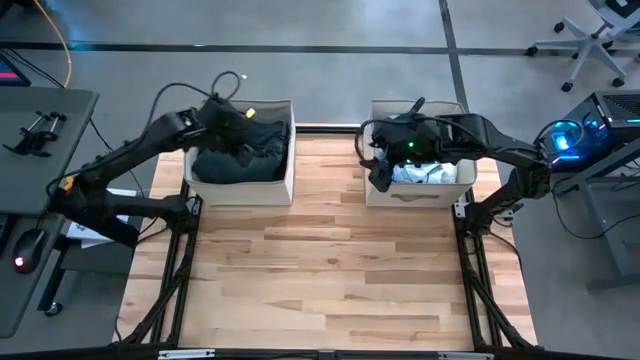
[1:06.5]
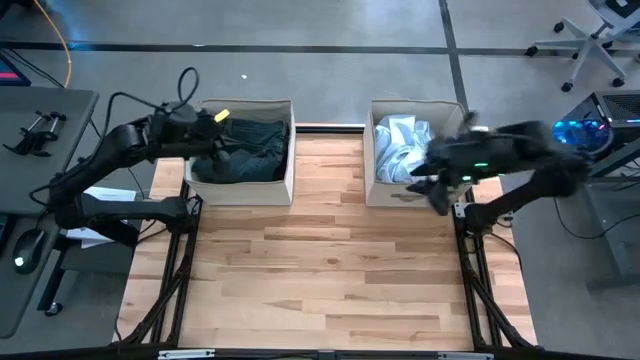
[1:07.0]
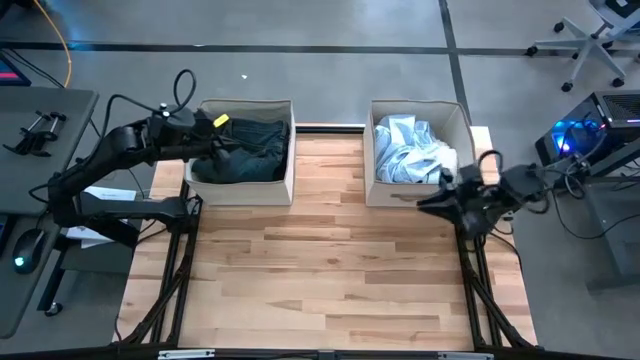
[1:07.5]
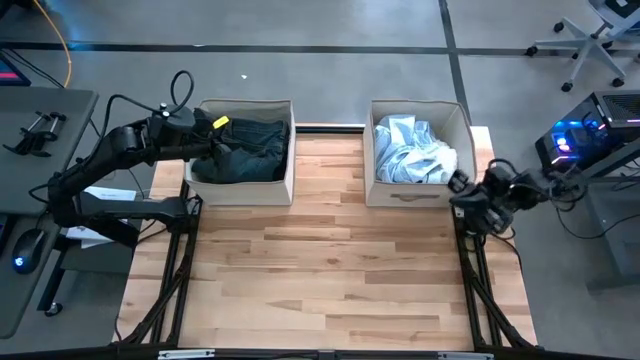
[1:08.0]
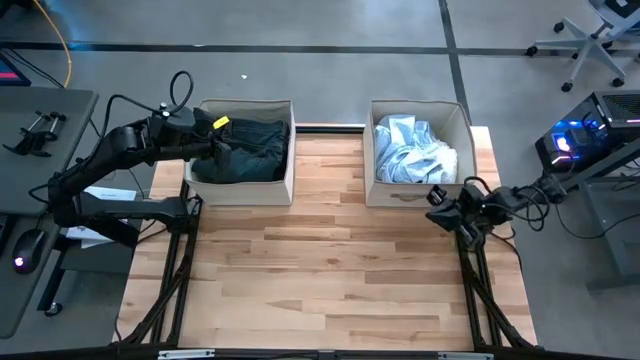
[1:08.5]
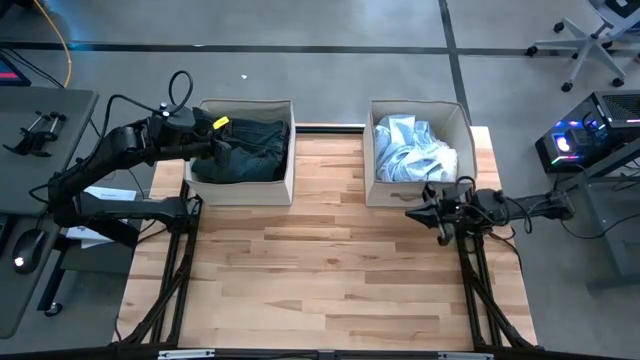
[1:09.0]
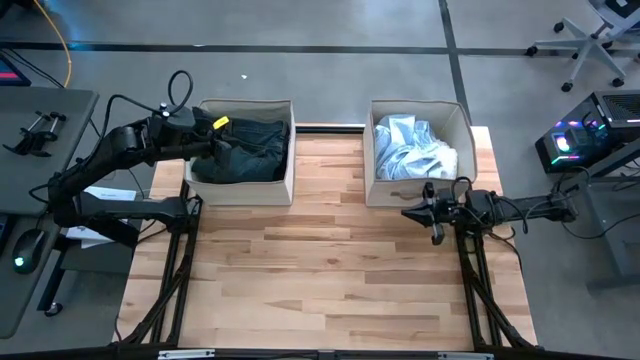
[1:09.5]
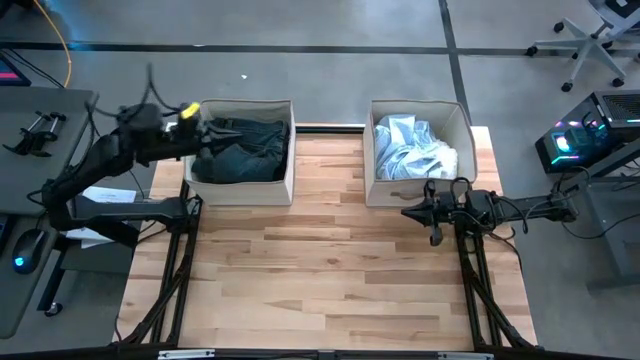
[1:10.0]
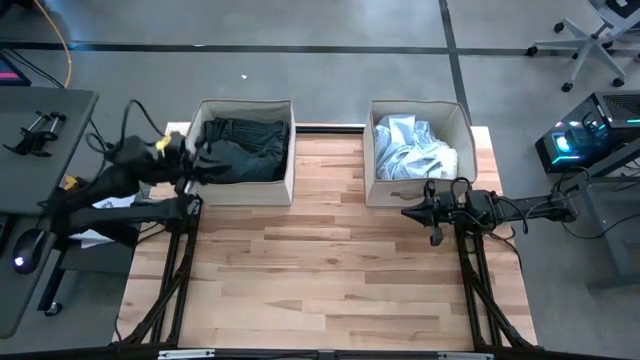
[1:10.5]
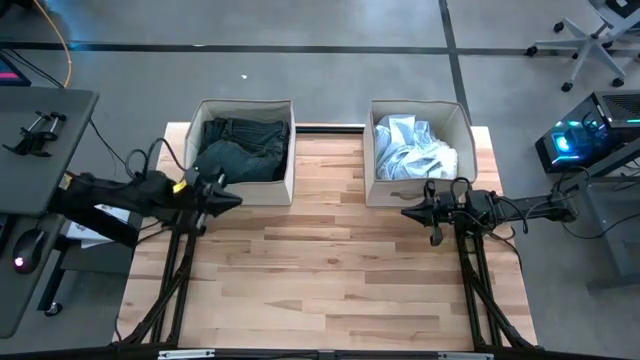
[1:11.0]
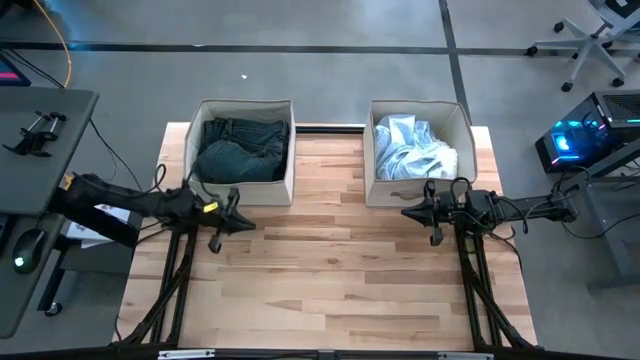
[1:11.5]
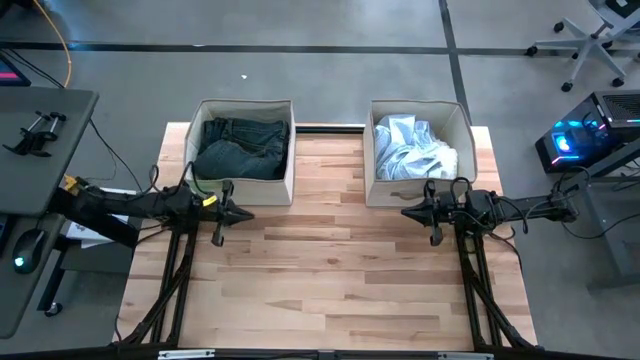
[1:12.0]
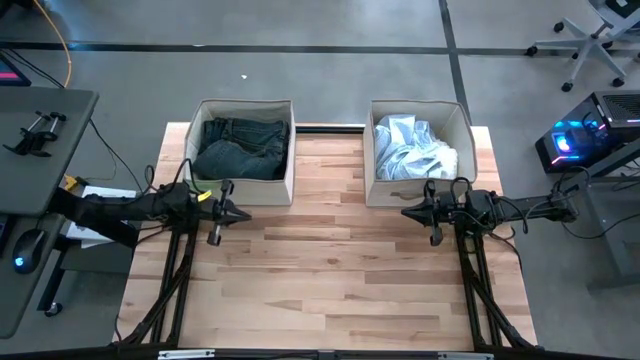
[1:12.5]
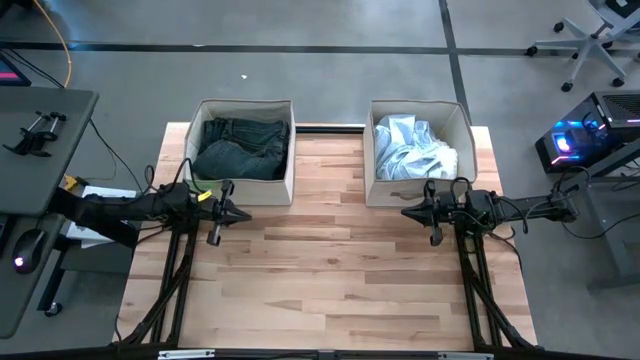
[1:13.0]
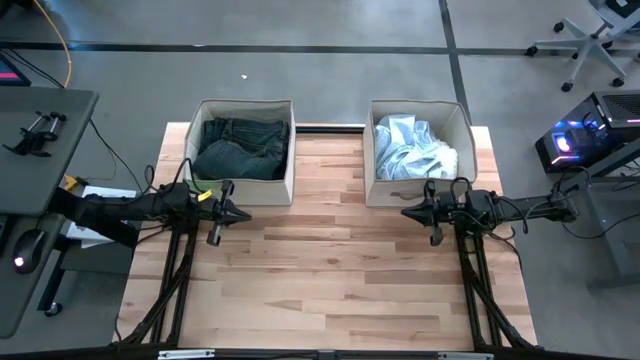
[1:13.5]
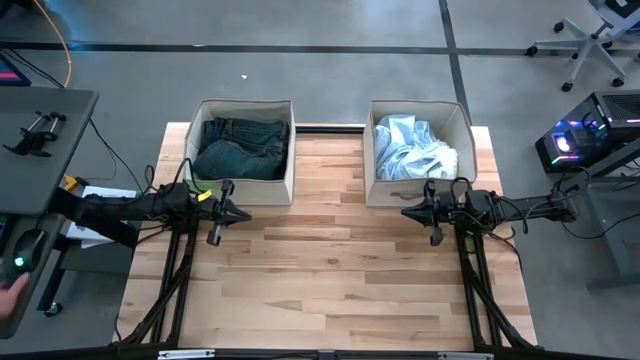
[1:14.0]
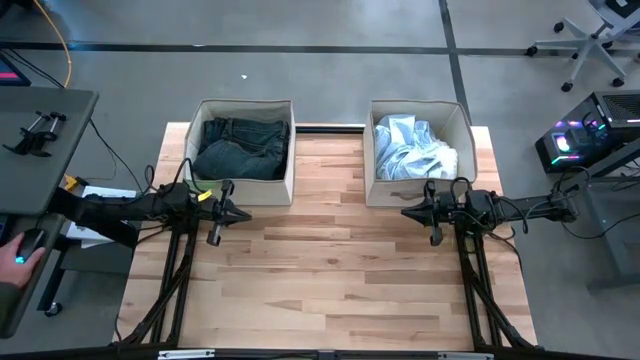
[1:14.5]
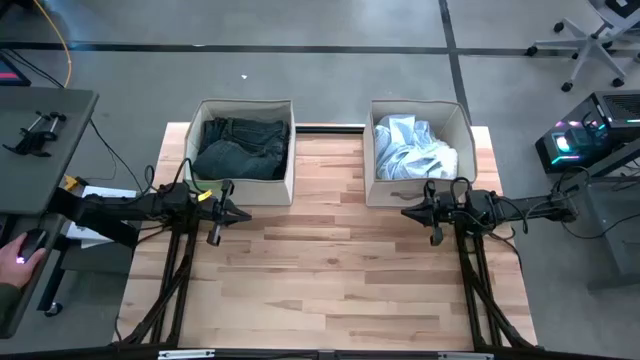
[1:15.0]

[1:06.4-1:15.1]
Task: Sort clothes
Return to Home Position

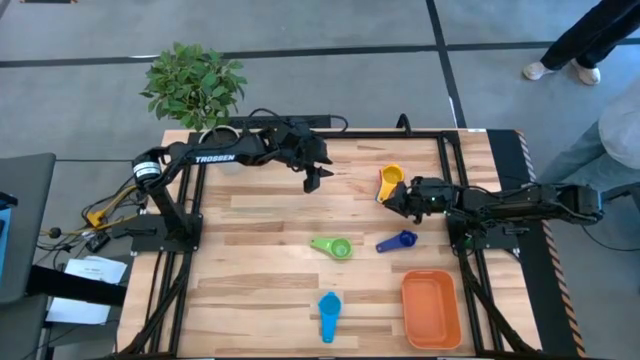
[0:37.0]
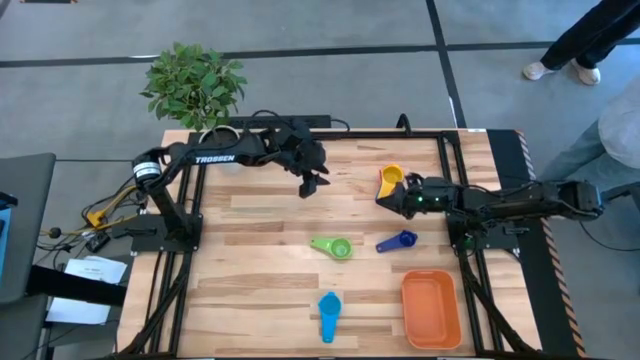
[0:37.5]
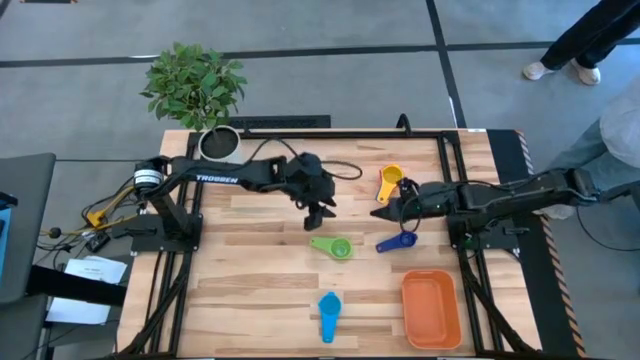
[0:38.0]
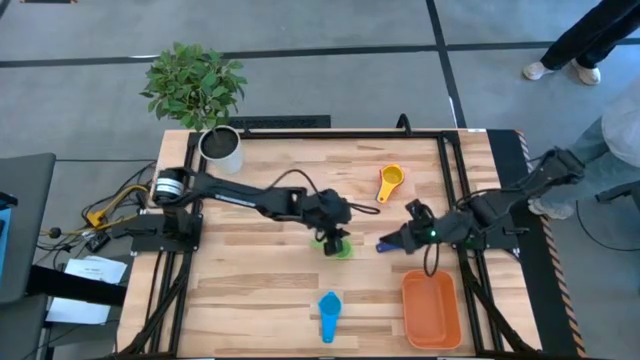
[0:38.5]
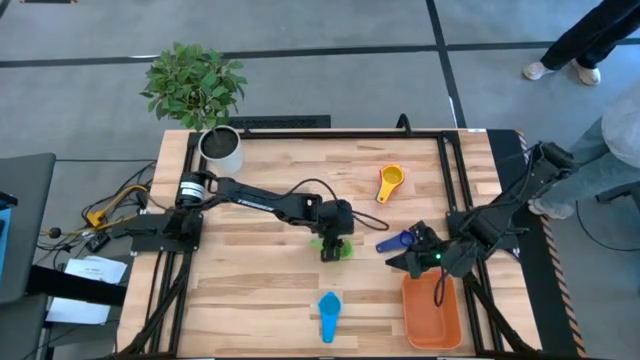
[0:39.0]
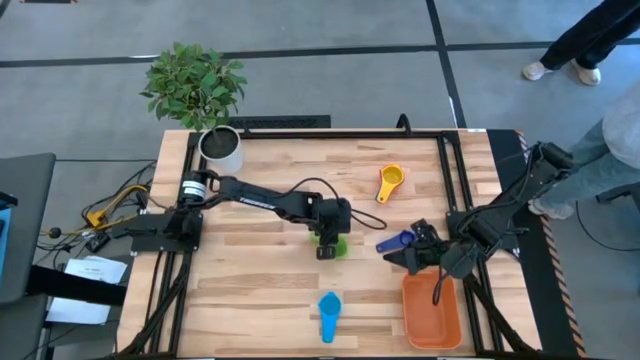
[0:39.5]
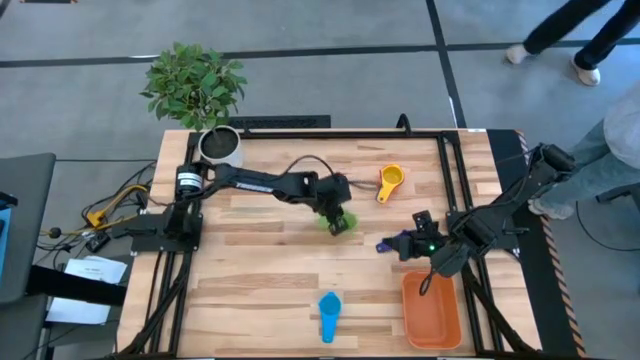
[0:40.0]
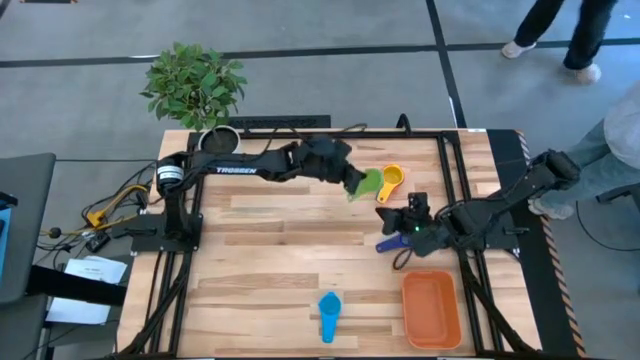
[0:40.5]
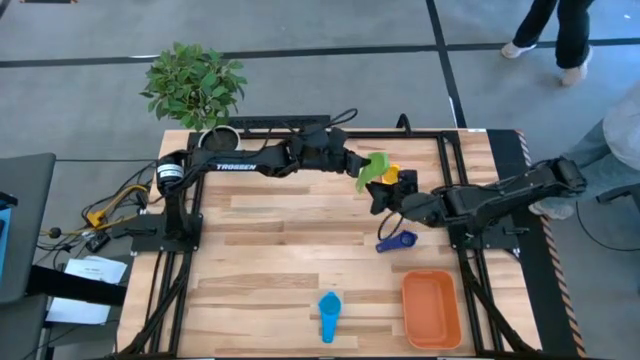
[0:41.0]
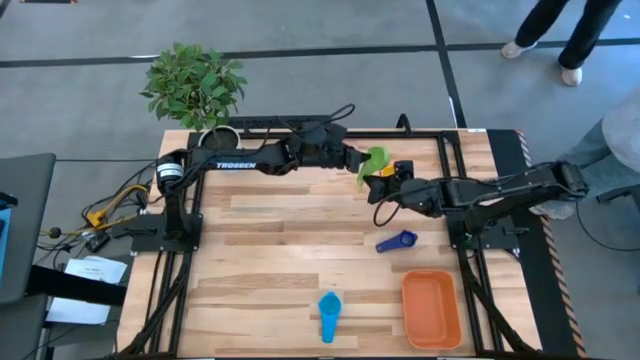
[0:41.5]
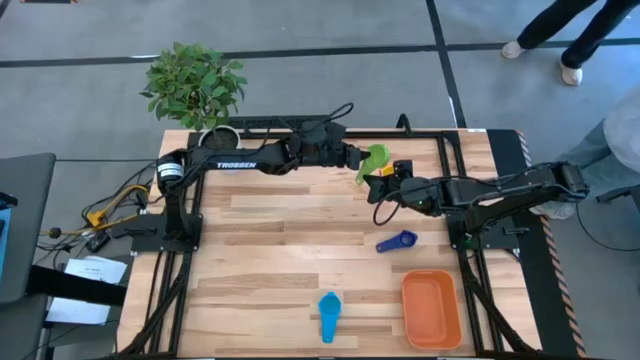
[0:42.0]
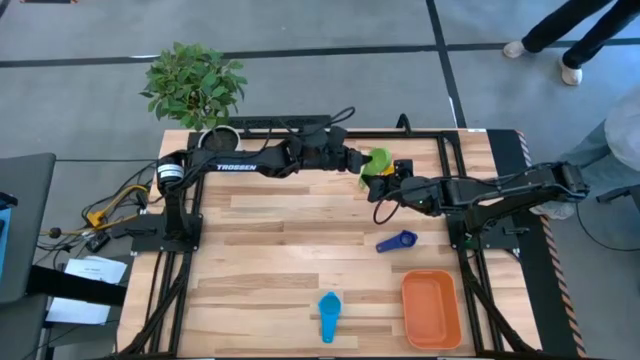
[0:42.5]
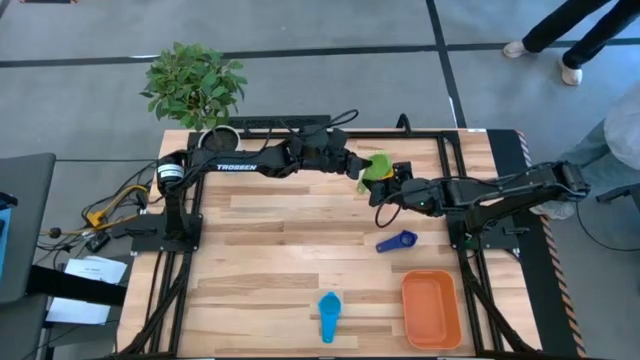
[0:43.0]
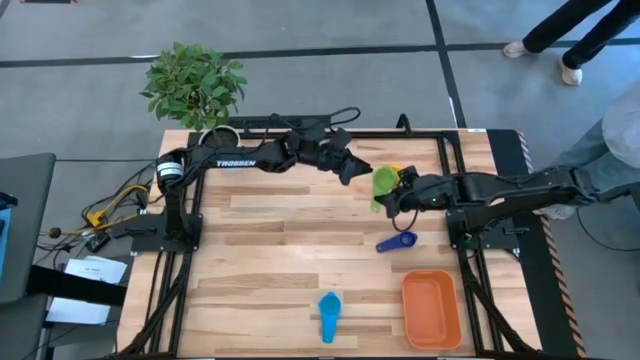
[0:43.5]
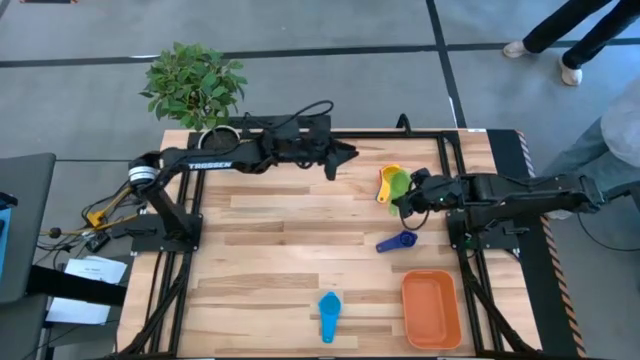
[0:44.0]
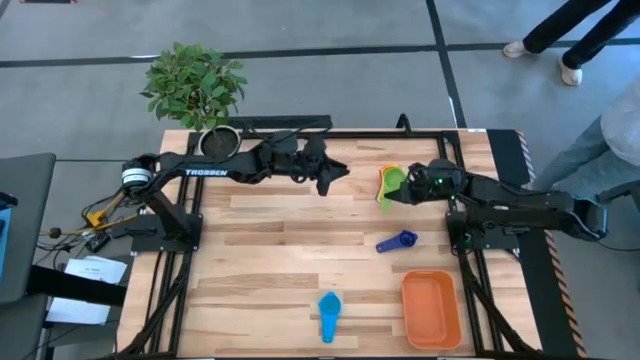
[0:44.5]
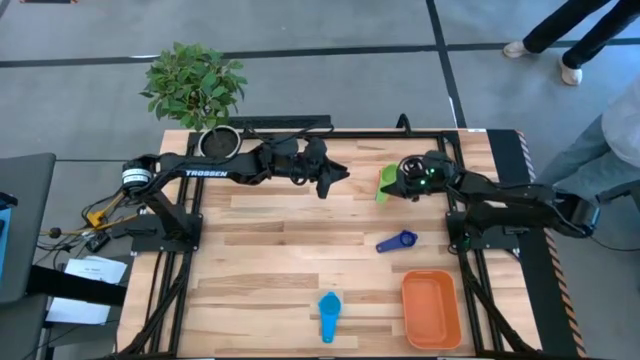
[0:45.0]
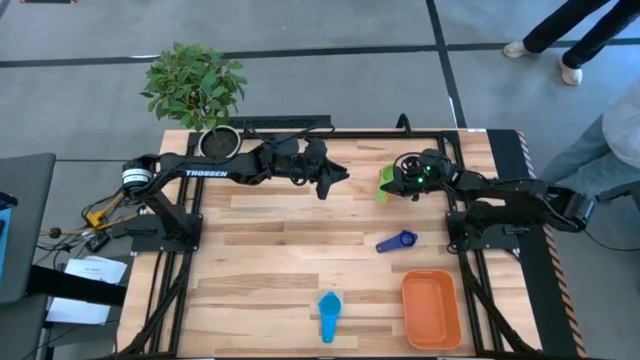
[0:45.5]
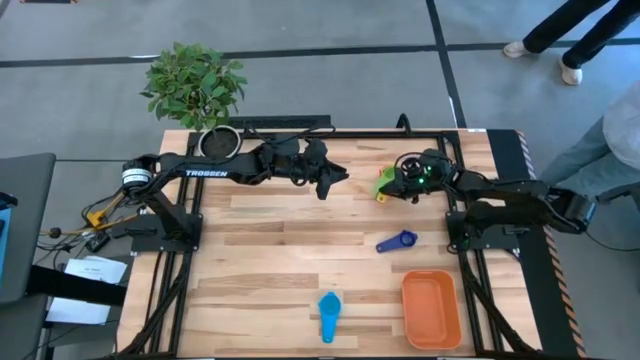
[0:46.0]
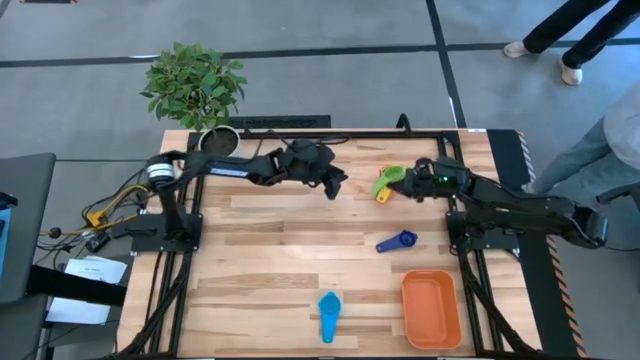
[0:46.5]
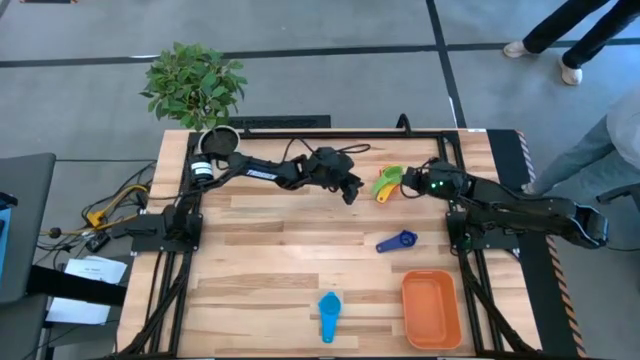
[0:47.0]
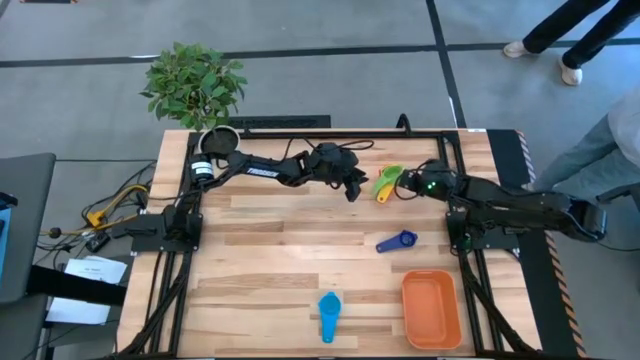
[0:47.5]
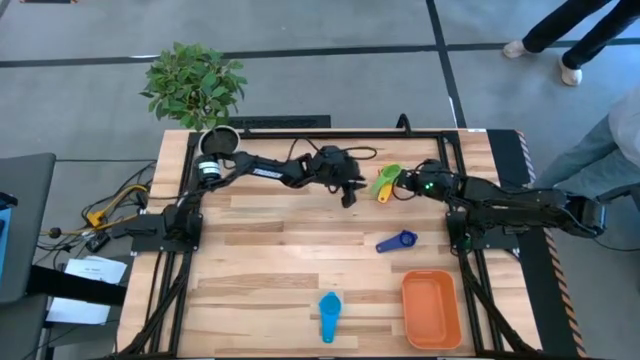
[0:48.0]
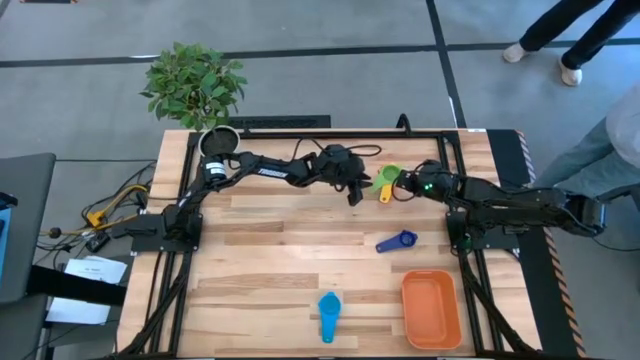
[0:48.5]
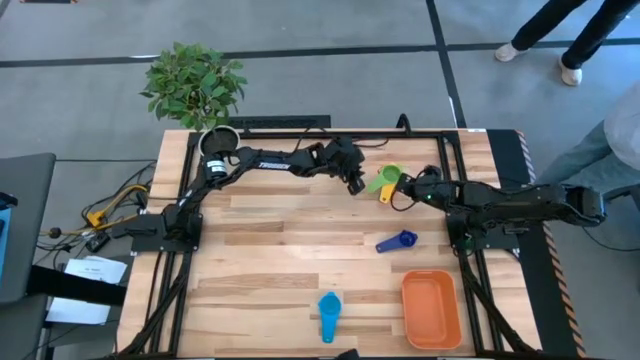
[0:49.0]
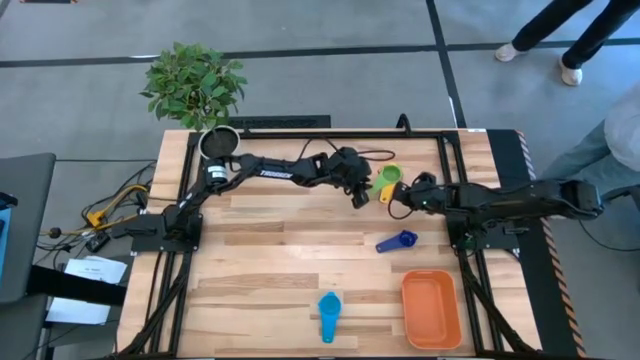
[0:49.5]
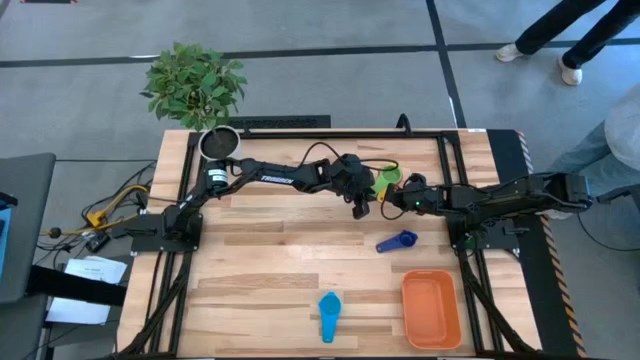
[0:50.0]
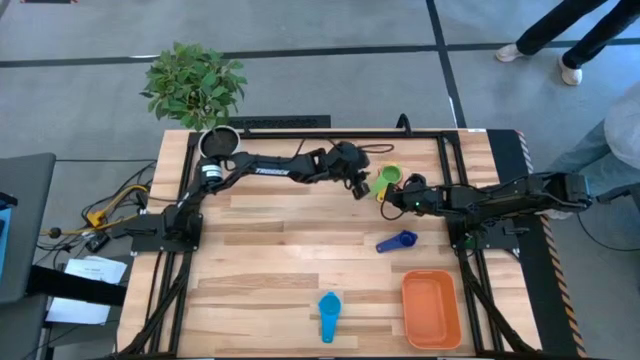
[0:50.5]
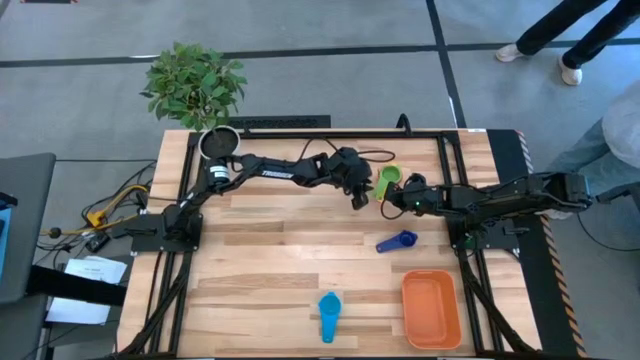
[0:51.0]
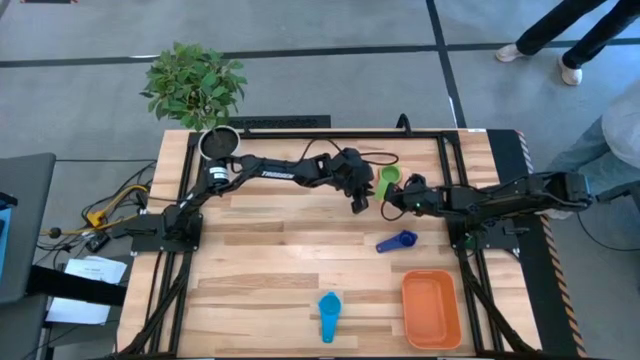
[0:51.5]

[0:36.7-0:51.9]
Task: Nest measuring cups in basket
Stack the green measuring cup on top of the yellow measuring cup
